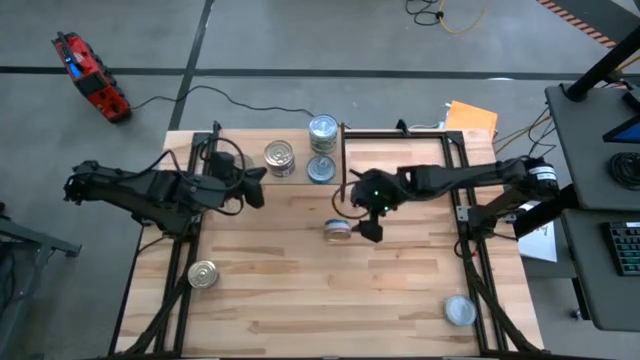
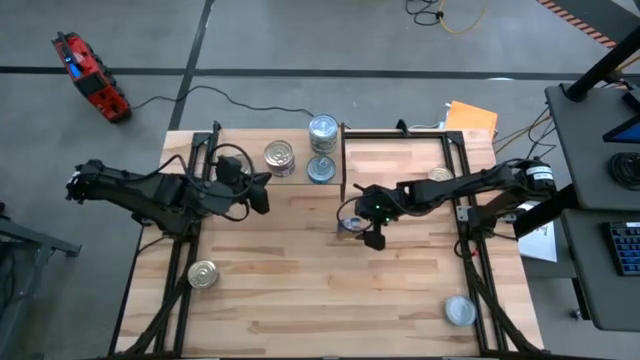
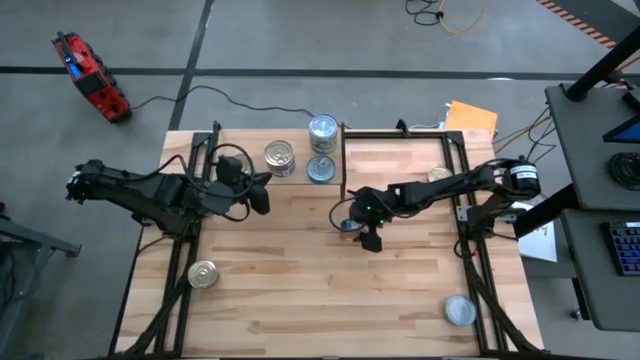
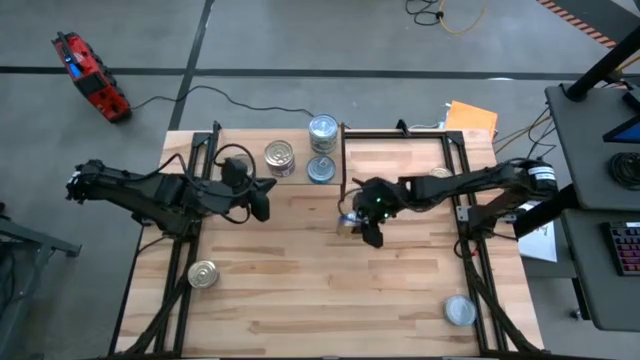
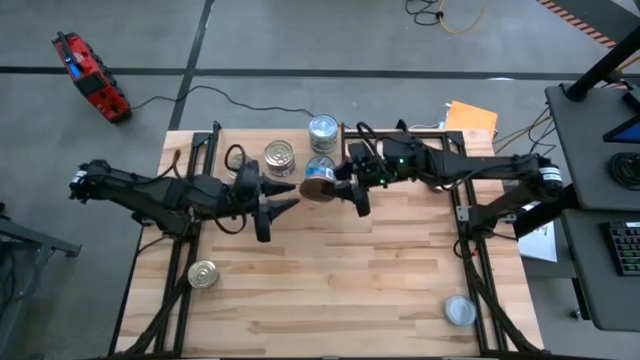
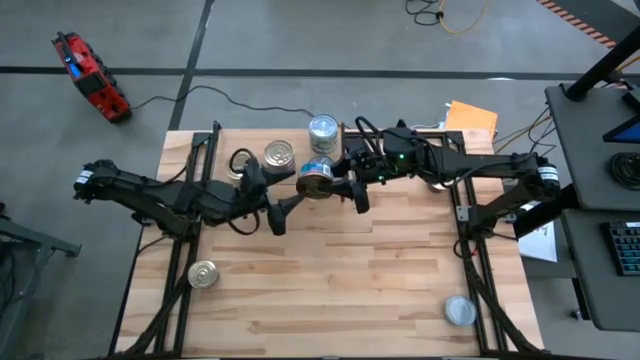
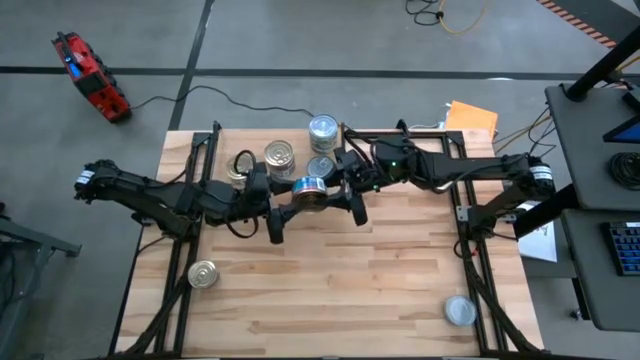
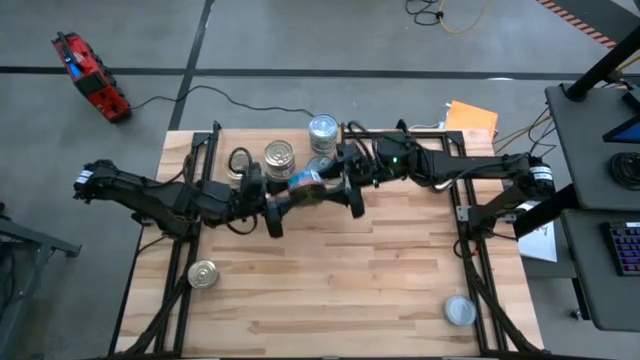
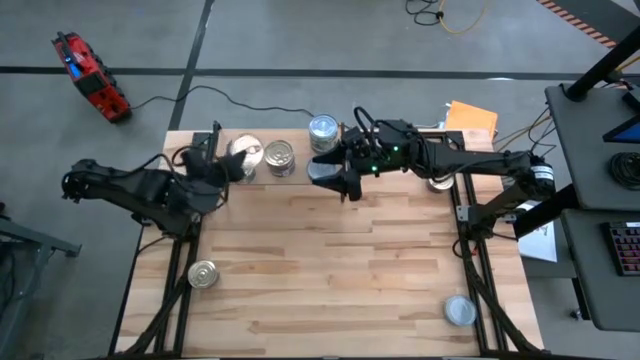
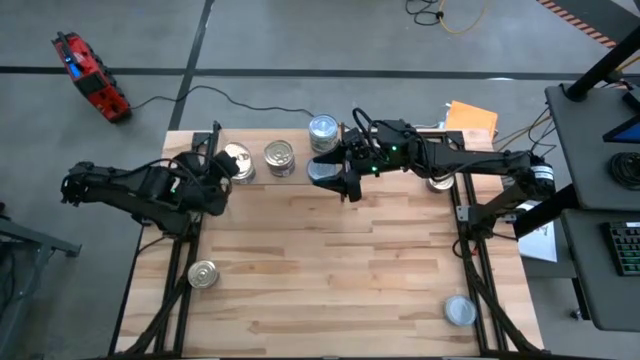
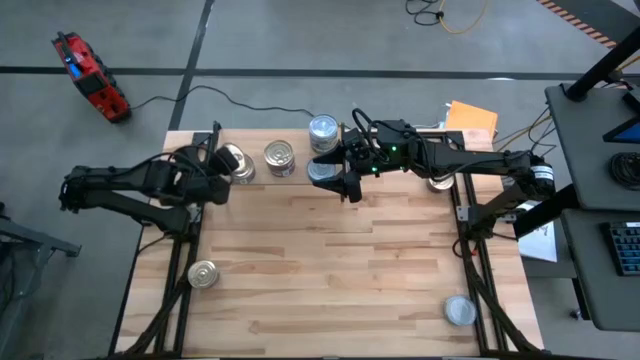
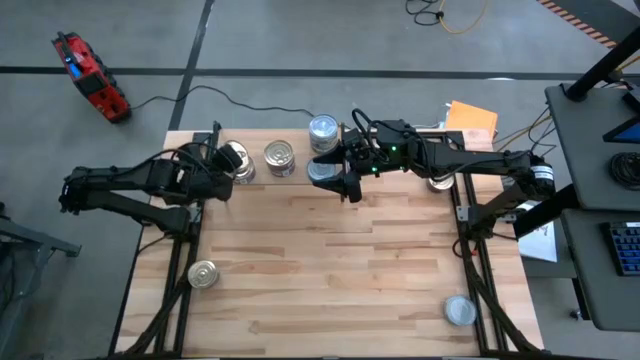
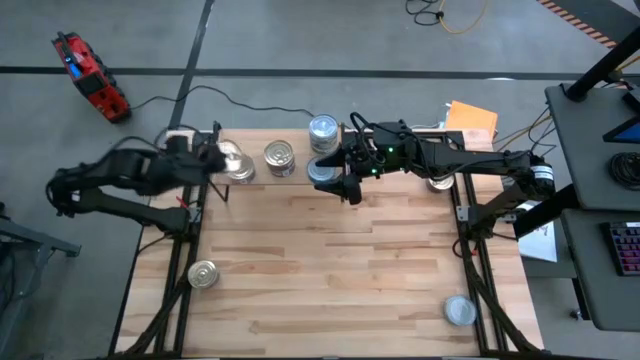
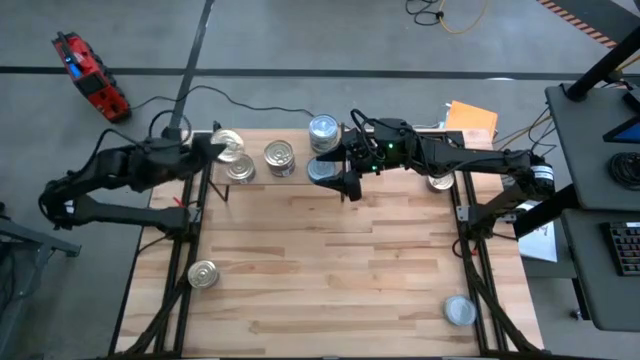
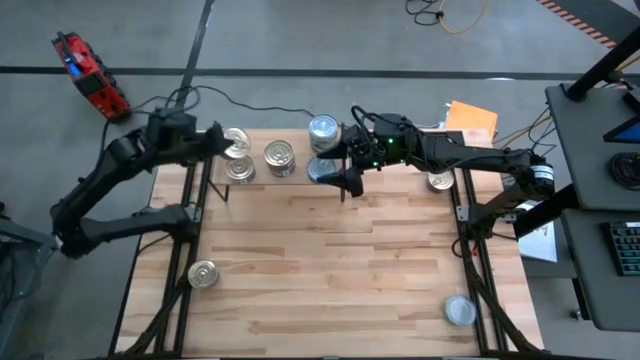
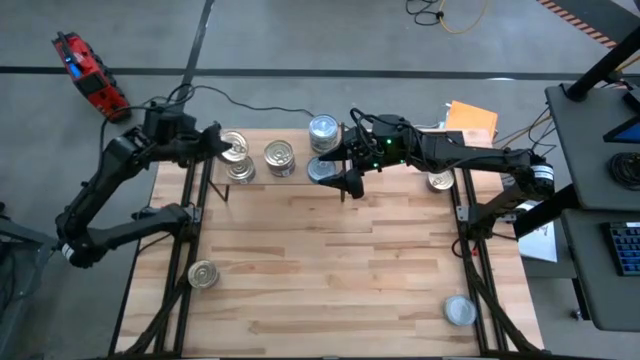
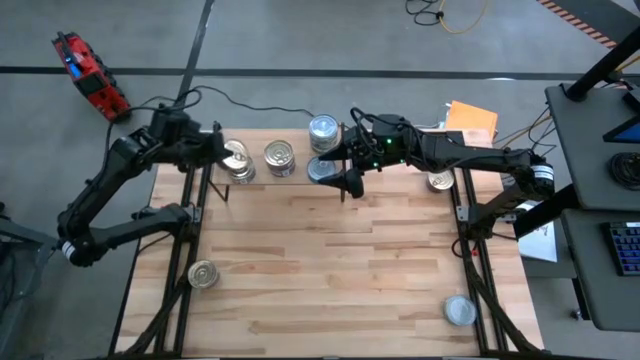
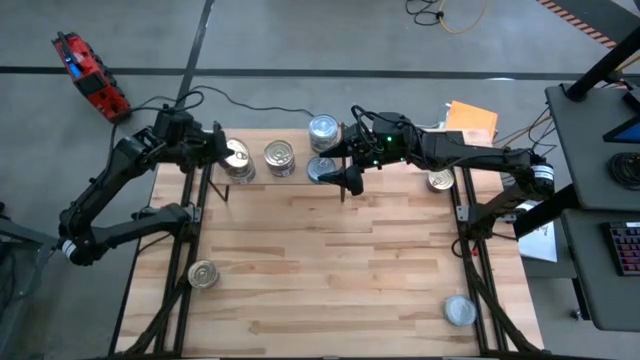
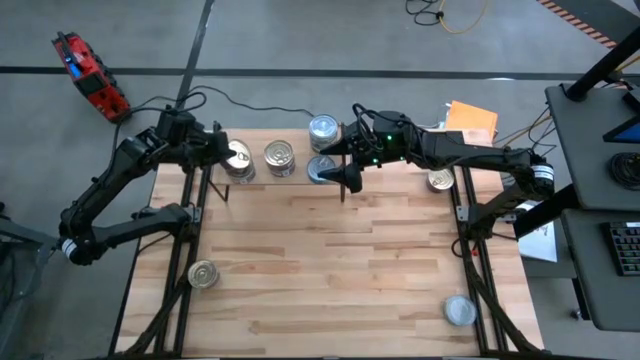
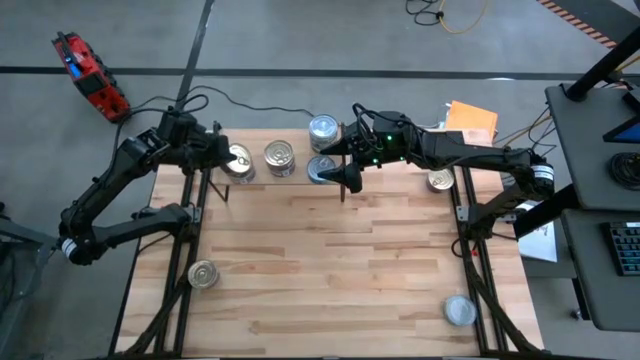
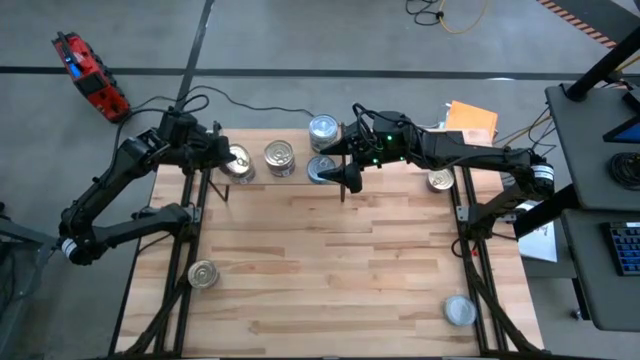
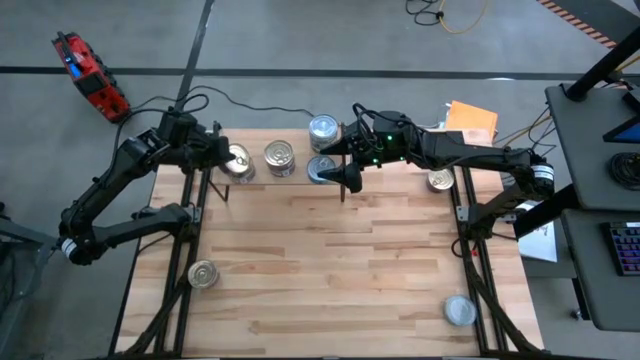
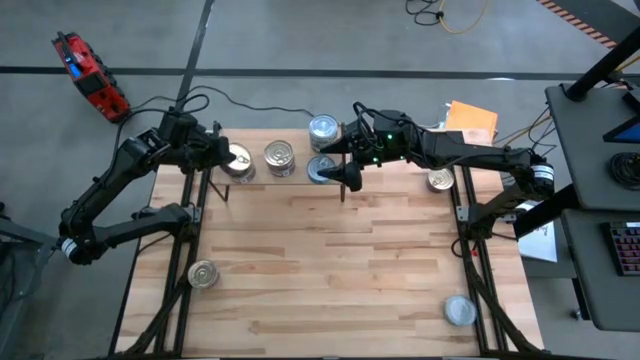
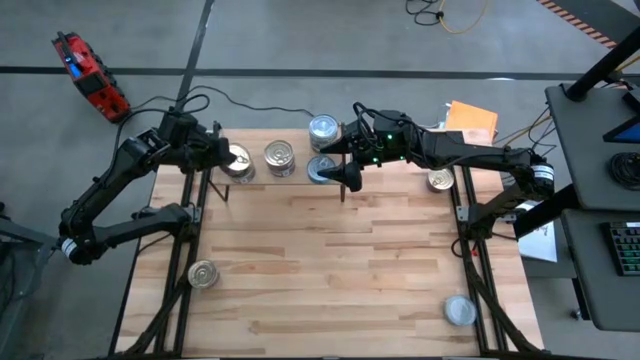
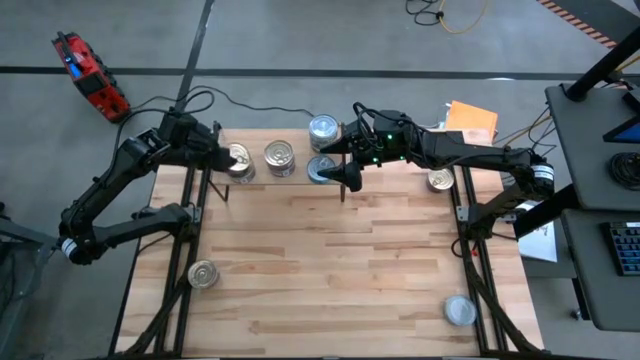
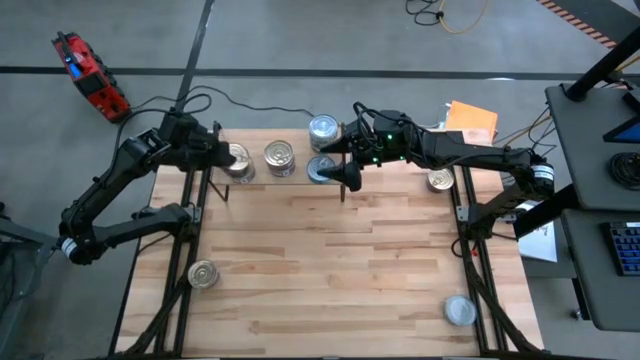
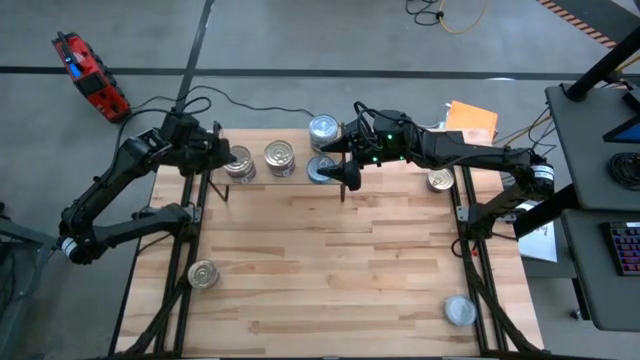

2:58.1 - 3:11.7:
Task: Stack canned seafood by type on shelf
Stack the blue and pink tuna can on top of the blue and pink tuna can on the shelf

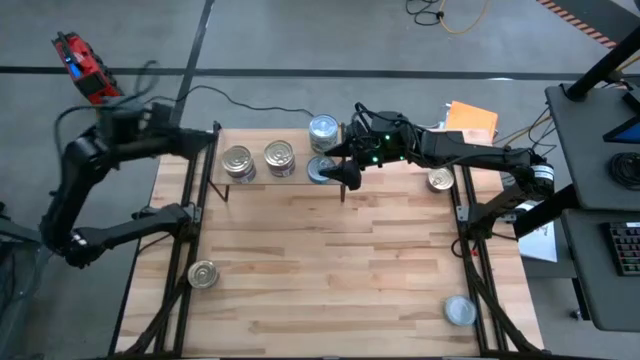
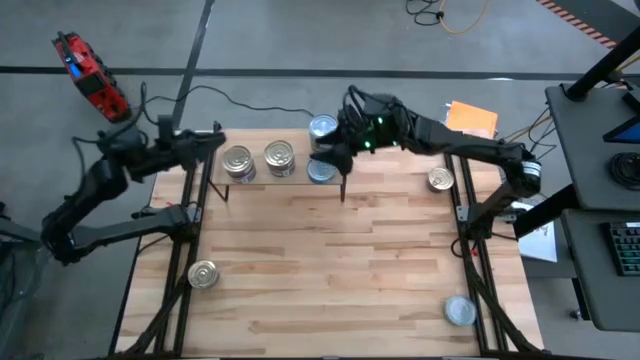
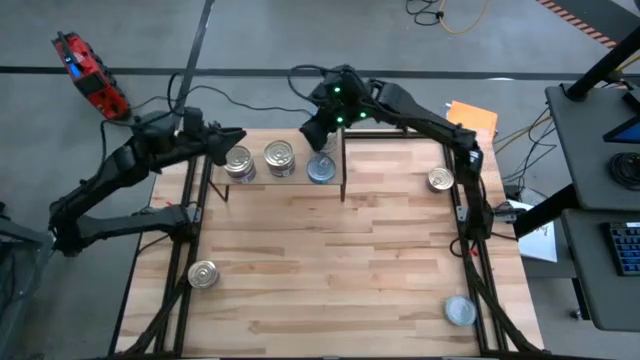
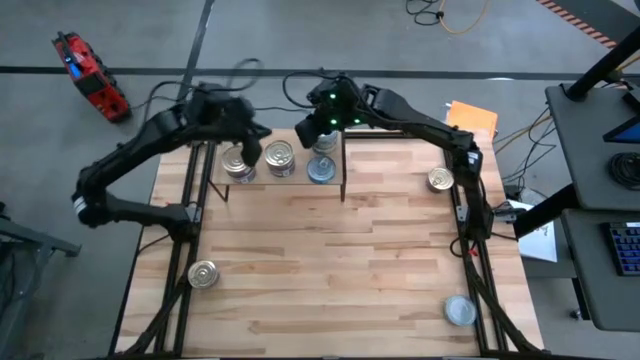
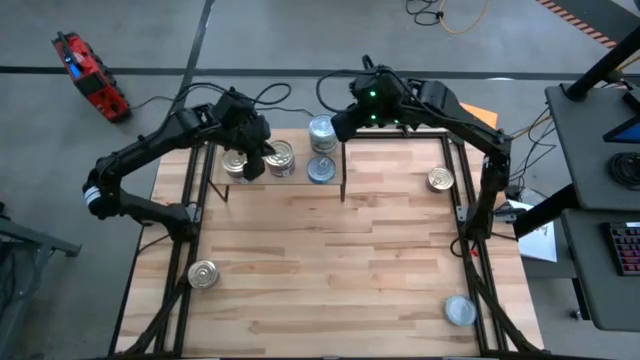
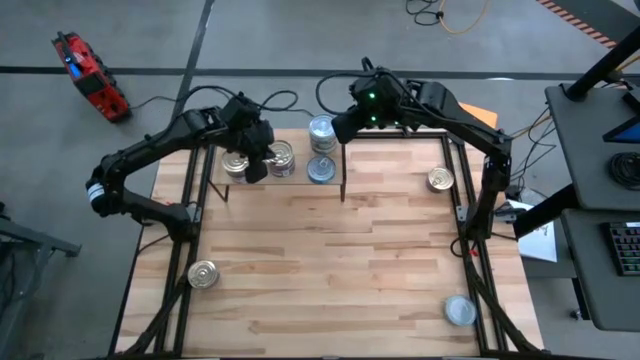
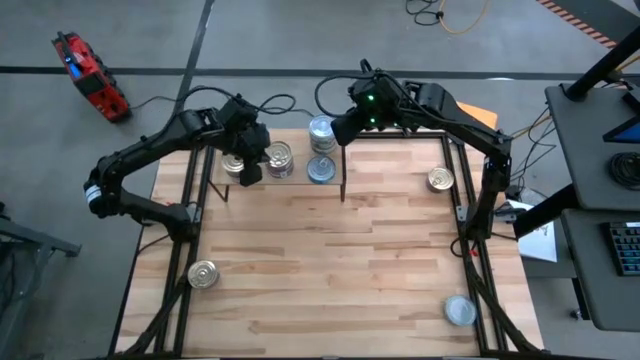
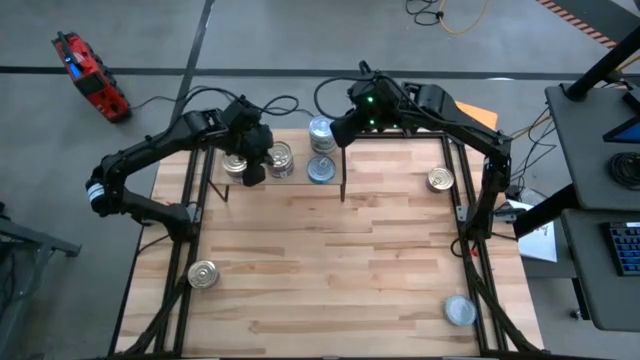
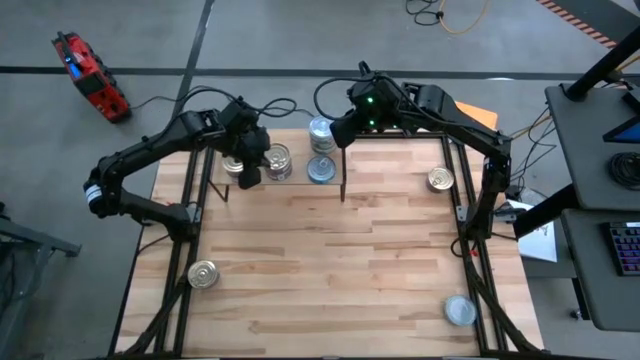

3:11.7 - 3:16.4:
Adjust the blue and pink tuna can

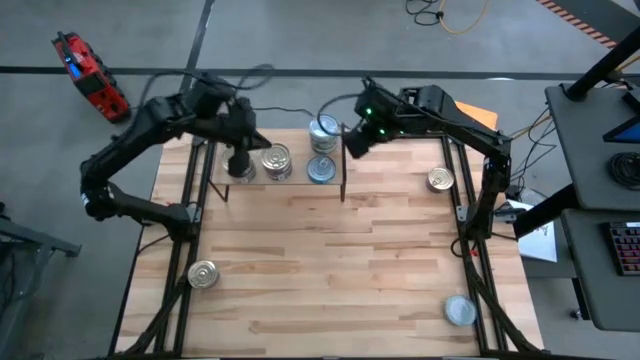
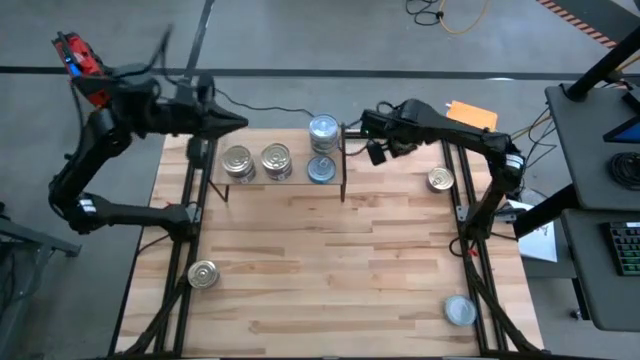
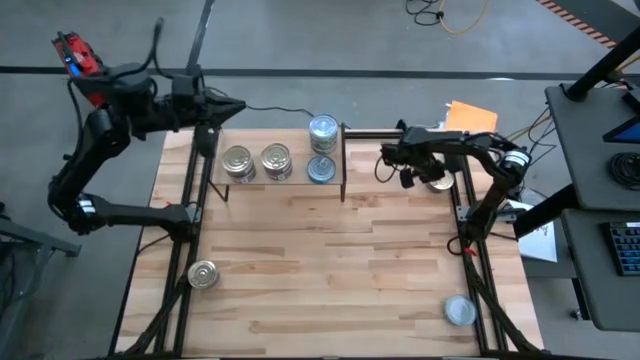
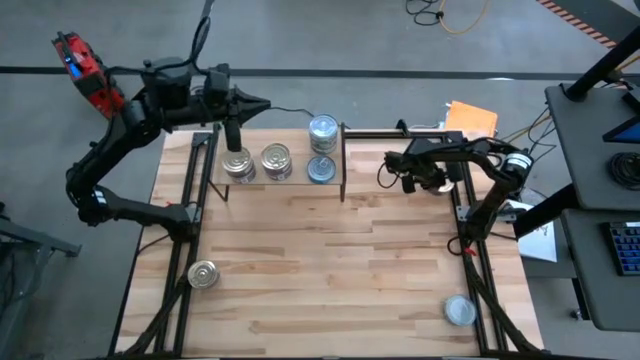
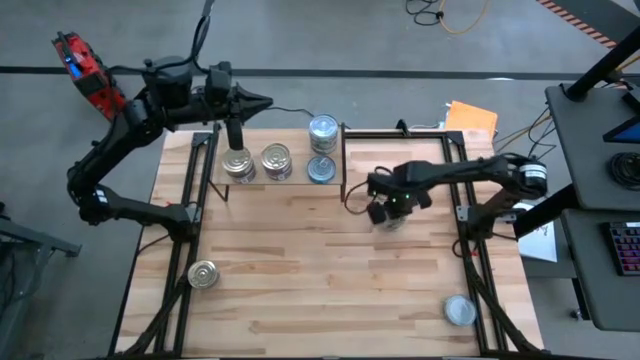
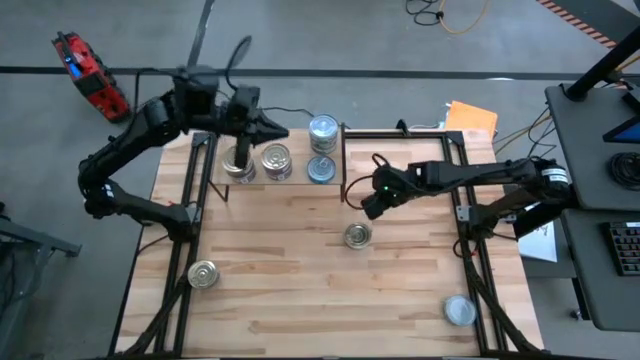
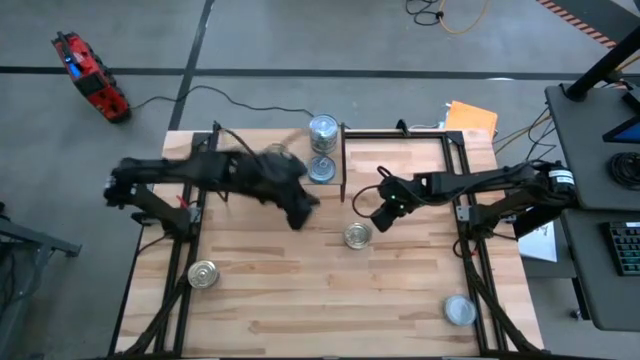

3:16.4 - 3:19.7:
Move the blue and pink tuna can to the center of the table
